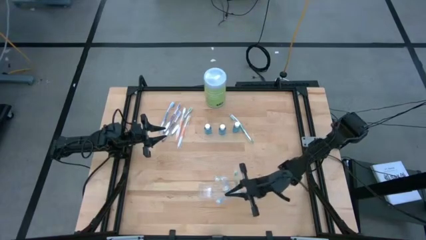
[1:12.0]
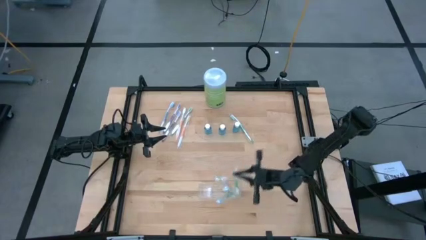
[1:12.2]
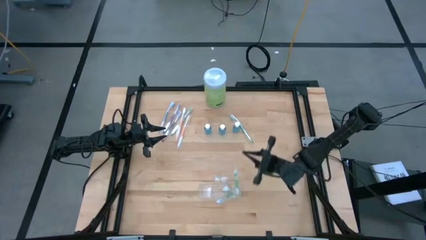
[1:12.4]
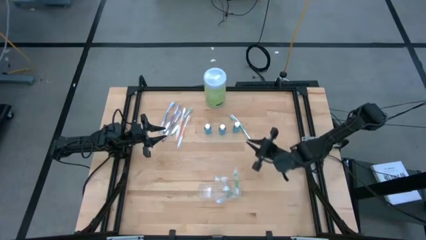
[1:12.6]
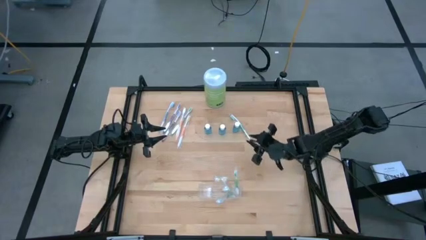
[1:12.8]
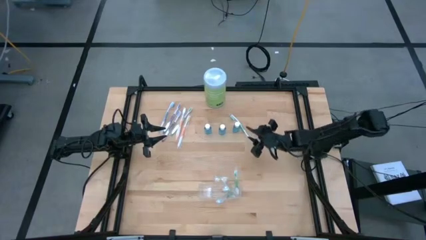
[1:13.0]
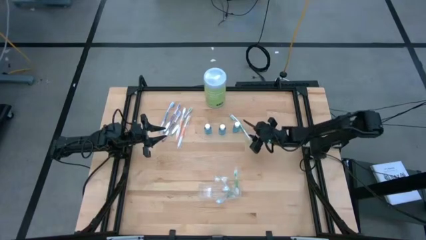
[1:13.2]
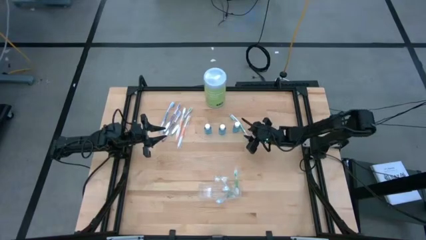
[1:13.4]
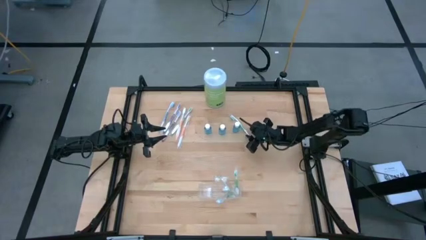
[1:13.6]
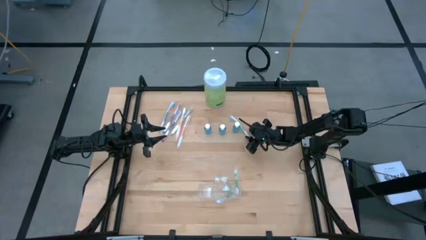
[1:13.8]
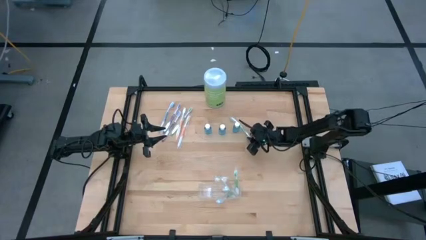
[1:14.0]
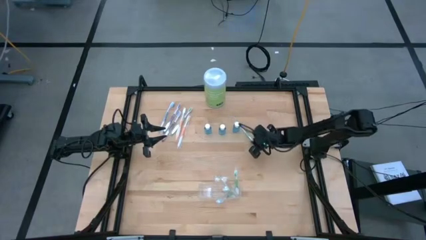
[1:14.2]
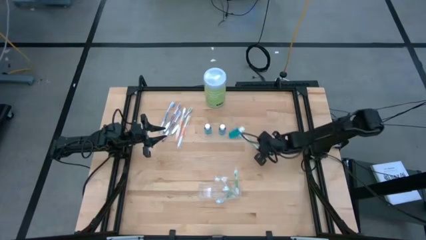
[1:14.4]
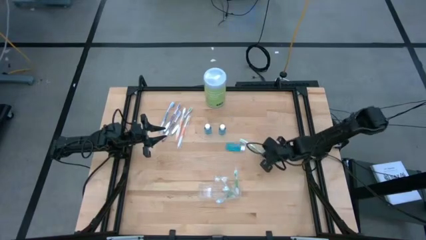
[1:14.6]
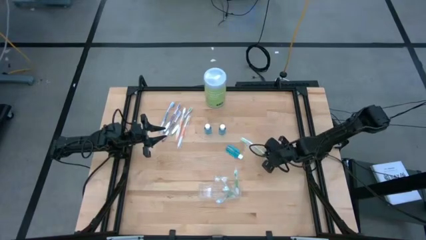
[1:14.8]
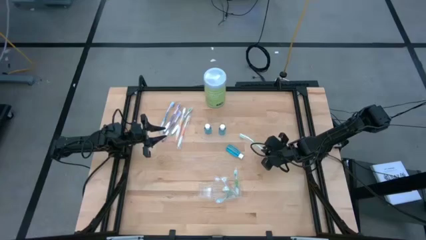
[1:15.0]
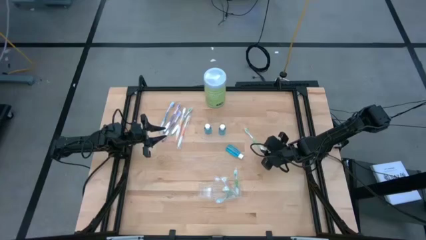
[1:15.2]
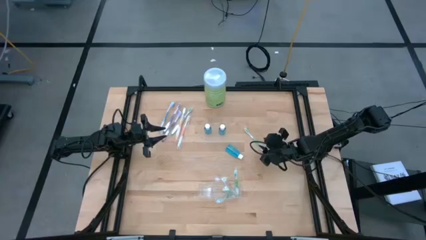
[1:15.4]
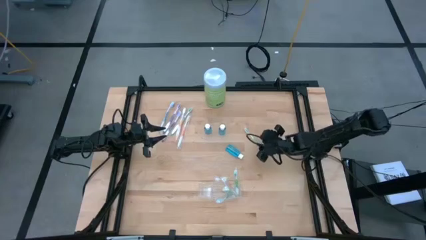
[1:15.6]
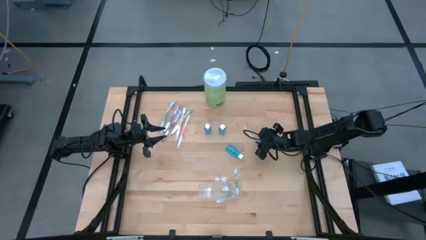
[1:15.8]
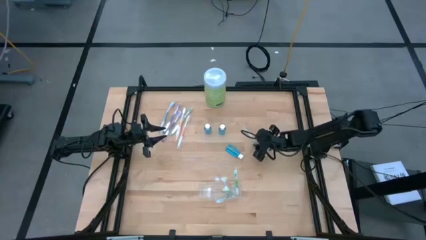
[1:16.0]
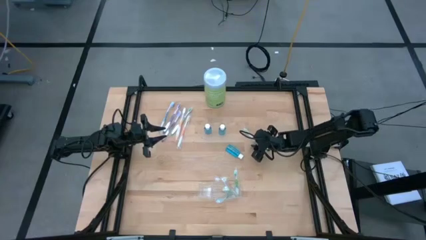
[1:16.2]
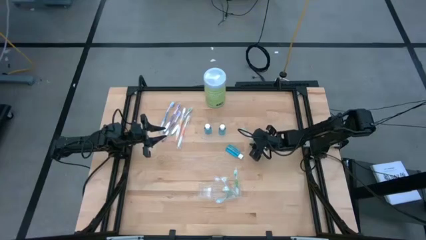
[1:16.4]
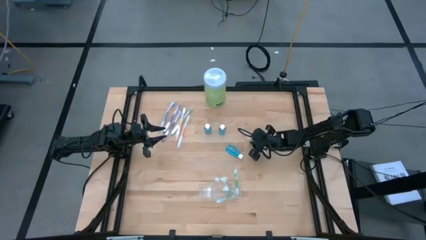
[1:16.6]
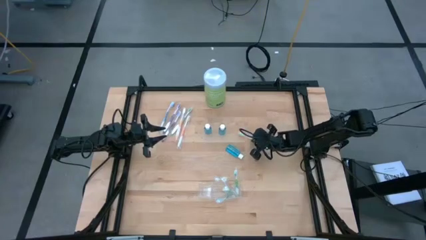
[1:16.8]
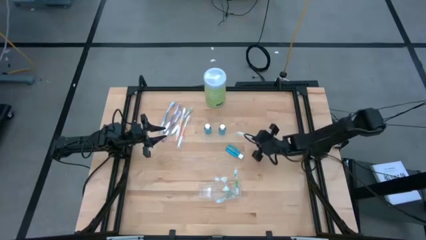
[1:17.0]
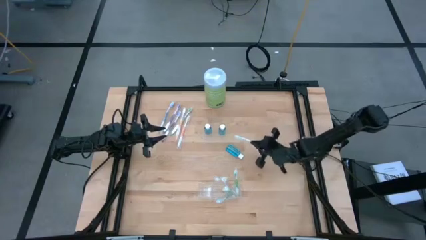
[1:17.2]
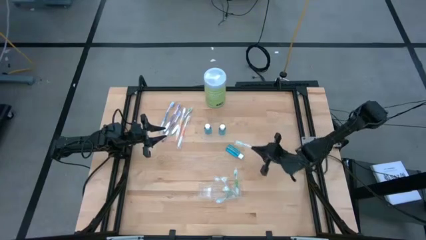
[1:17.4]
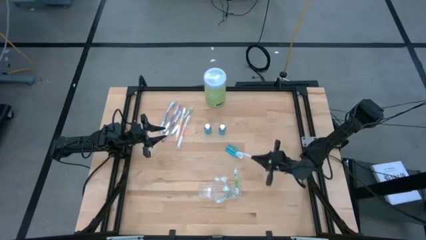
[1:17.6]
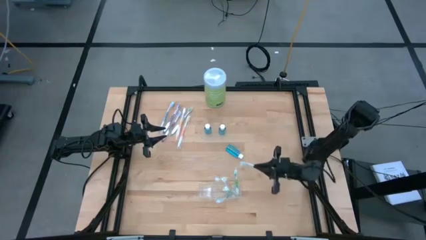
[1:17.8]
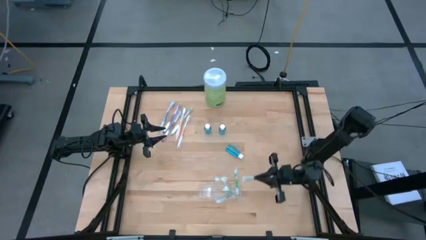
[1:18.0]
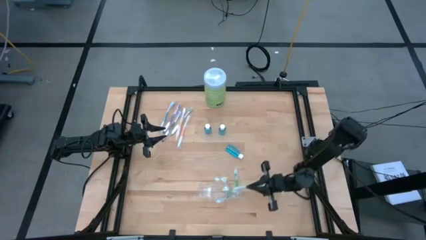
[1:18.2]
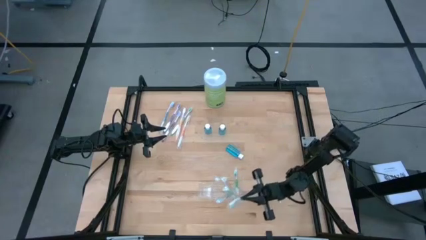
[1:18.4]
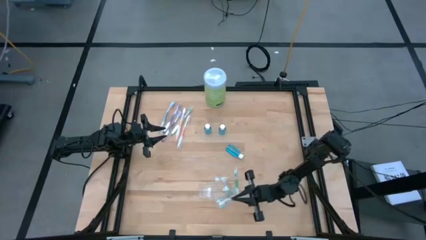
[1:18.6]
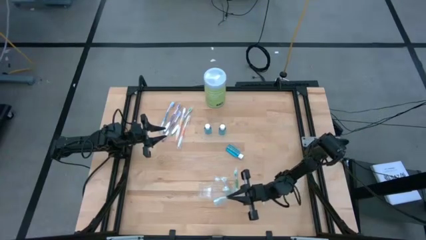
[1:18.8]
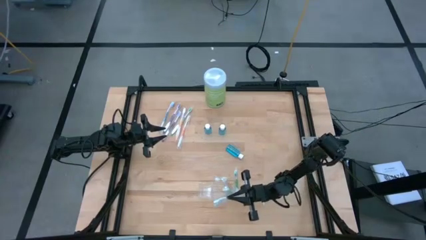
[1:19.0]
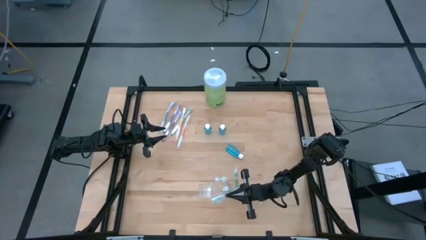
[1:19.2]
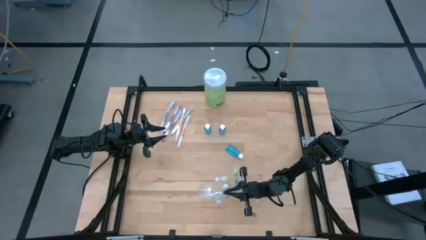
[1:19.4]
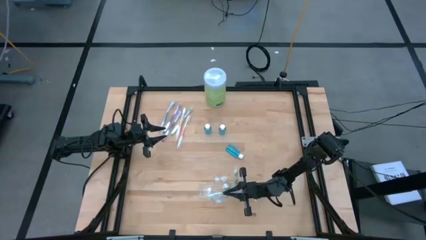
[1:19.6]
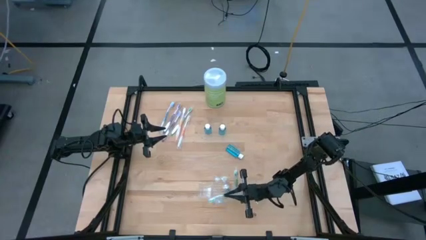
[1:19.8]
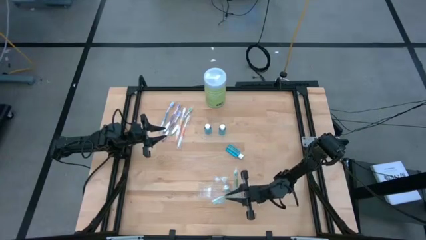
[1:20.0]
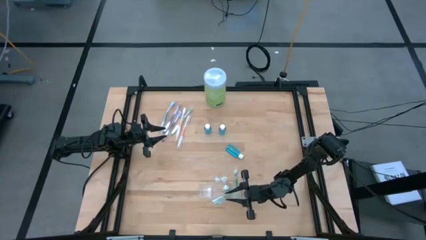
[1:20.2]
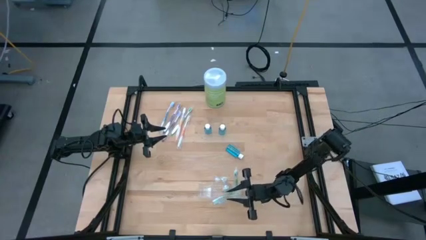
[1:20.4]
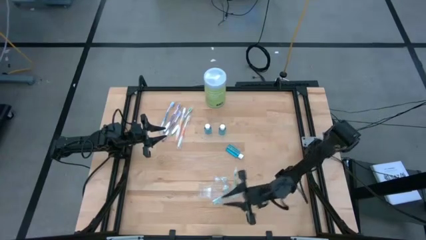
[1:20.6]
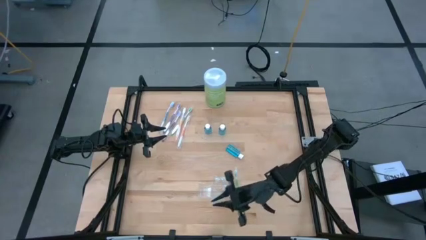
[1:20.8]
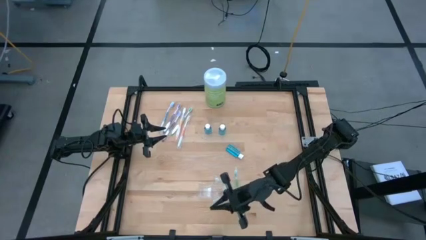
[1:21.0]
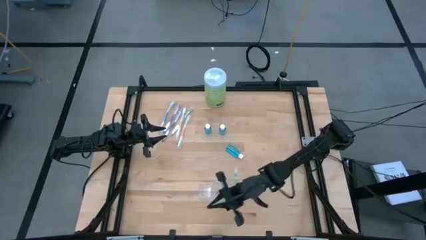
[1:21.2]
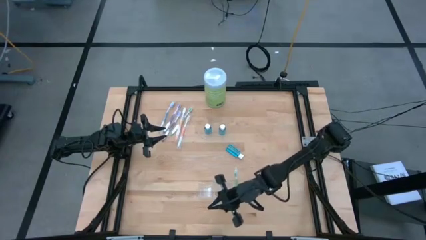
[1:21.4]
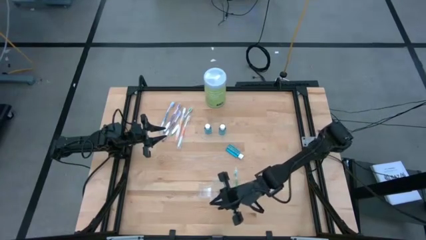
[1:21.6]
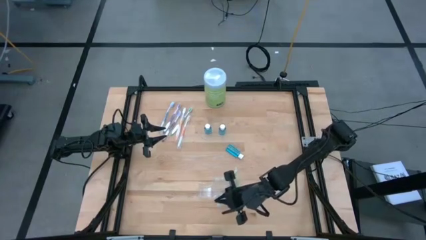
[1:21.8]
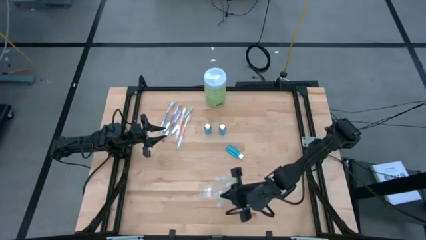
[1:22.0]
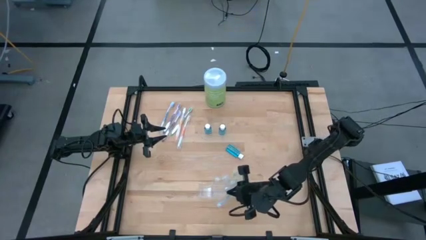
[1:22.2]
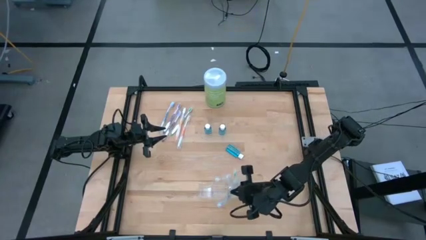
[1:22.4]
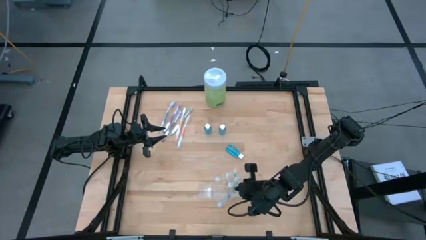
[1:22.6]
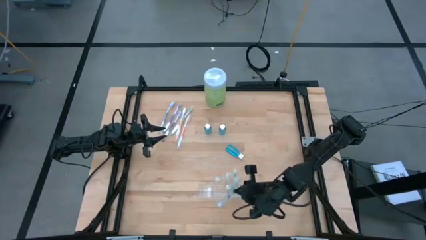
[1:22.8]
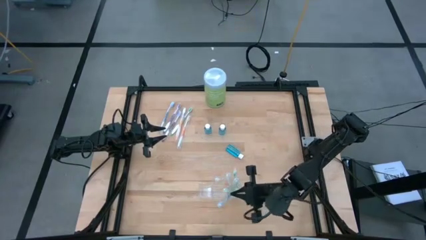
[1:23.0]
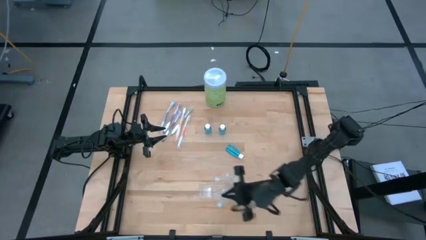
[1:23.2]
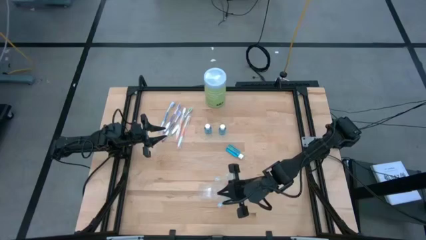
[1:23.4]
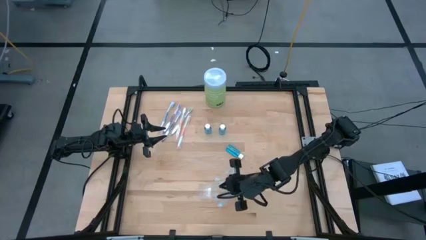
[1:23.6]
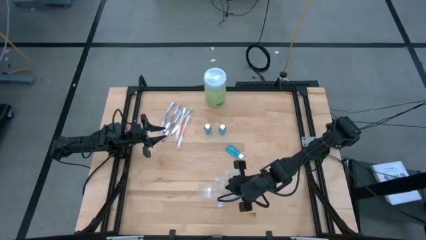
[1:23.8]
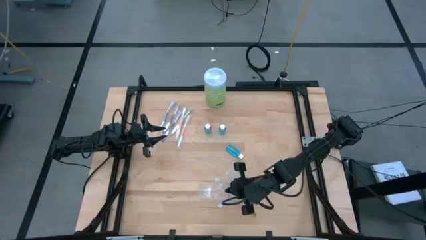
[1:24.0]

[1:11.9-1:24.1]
Task: Pick & Place toothbrushing station
Put the green toothbrush into the transparent organizer
